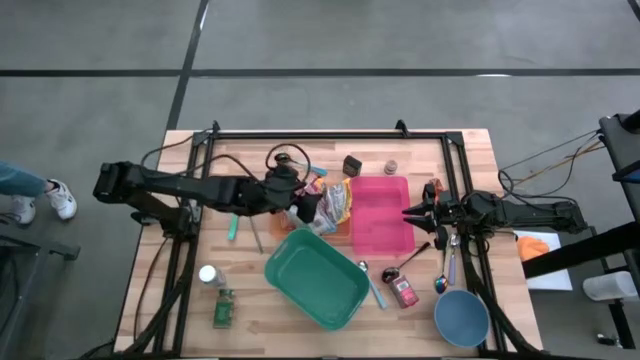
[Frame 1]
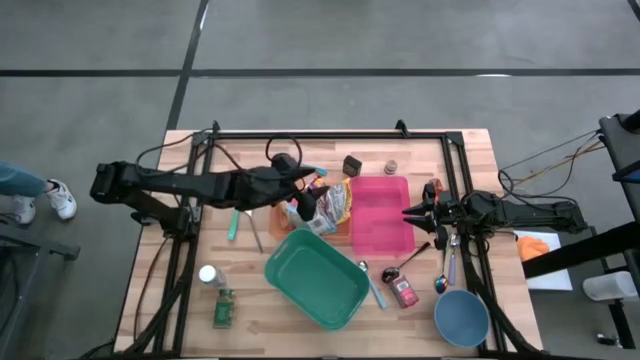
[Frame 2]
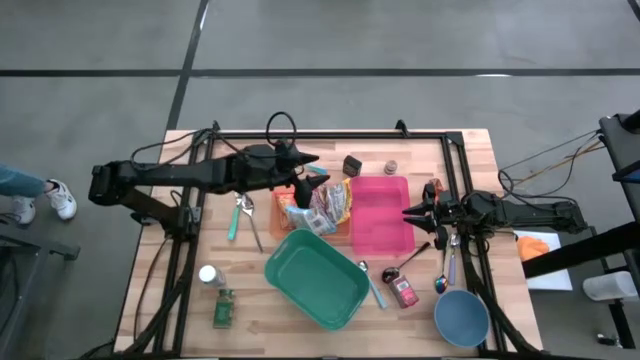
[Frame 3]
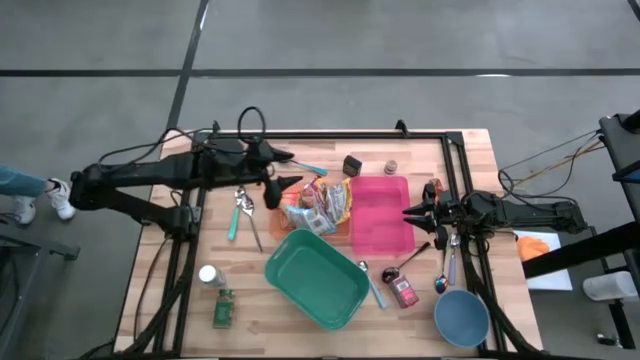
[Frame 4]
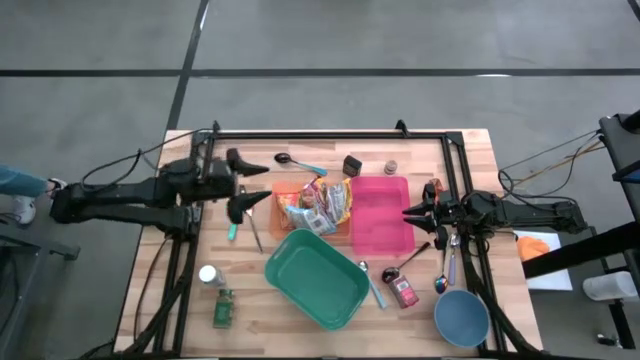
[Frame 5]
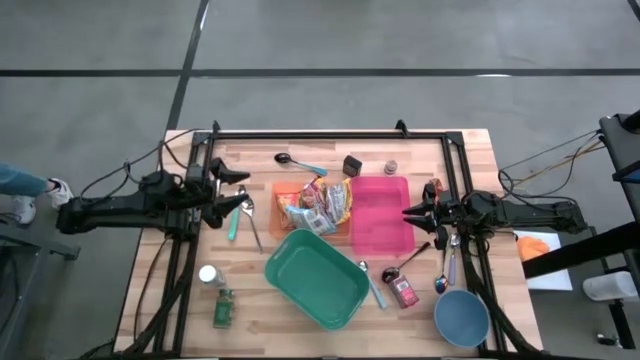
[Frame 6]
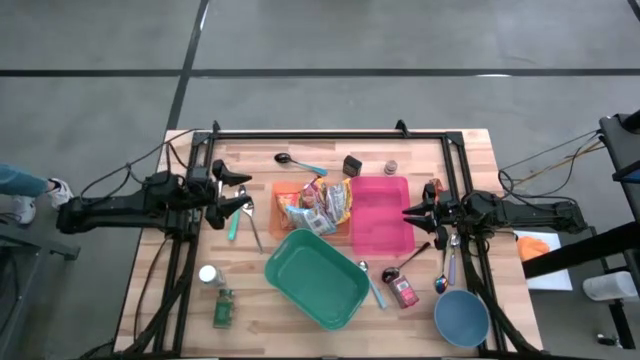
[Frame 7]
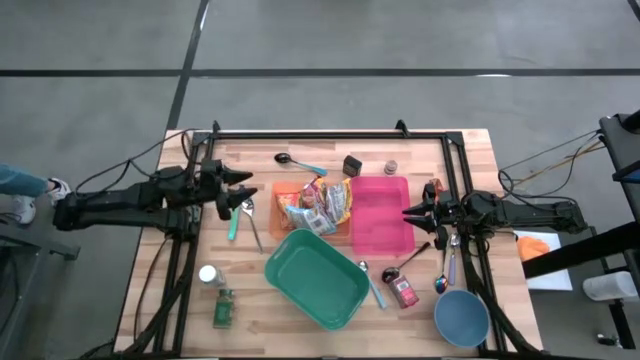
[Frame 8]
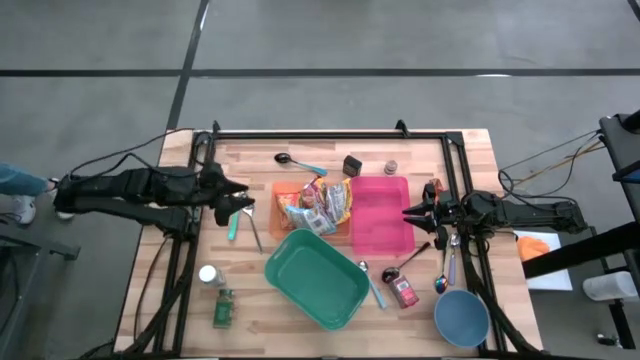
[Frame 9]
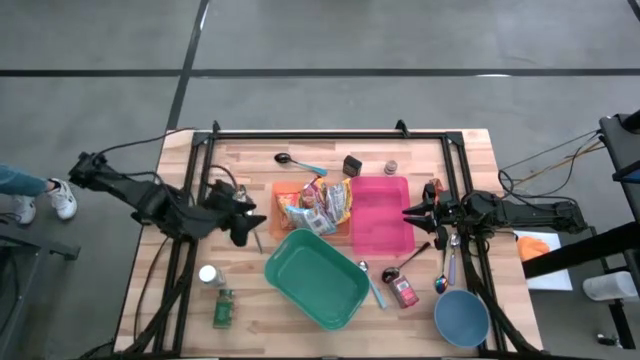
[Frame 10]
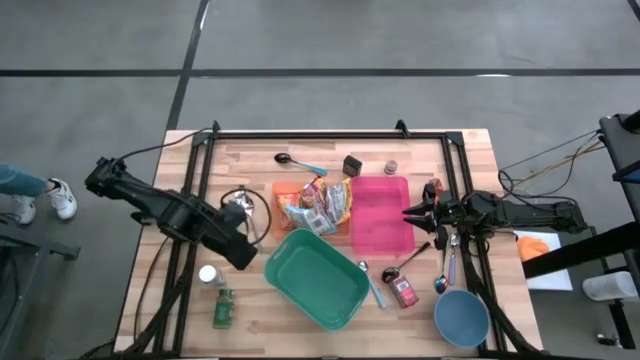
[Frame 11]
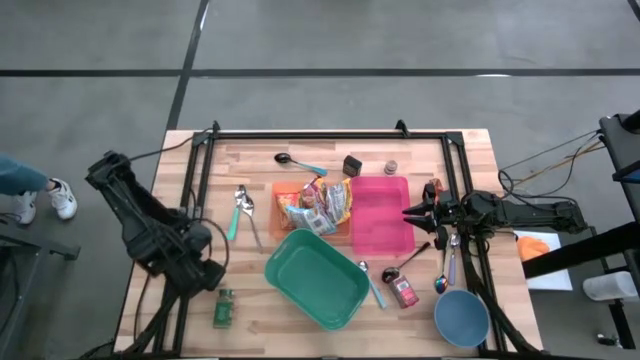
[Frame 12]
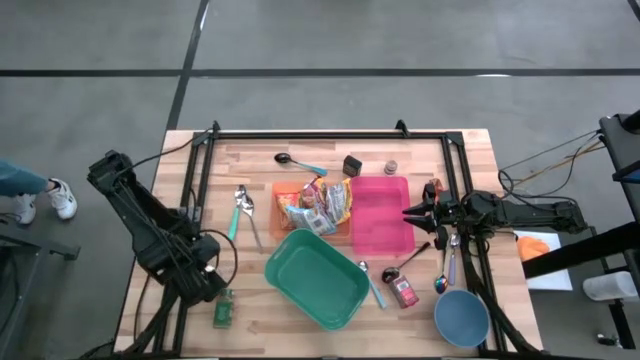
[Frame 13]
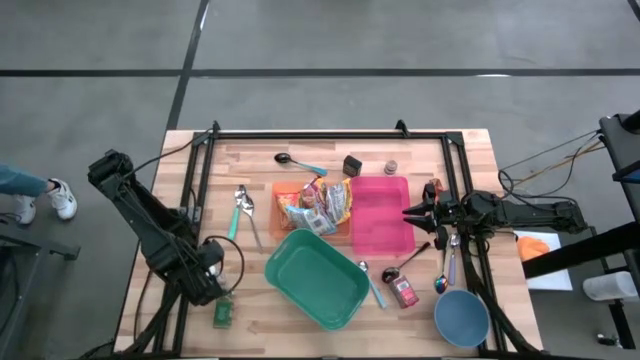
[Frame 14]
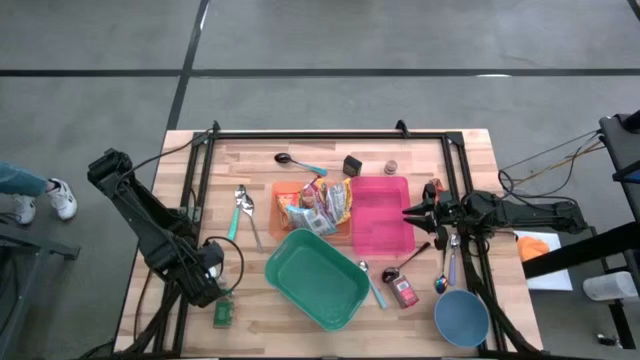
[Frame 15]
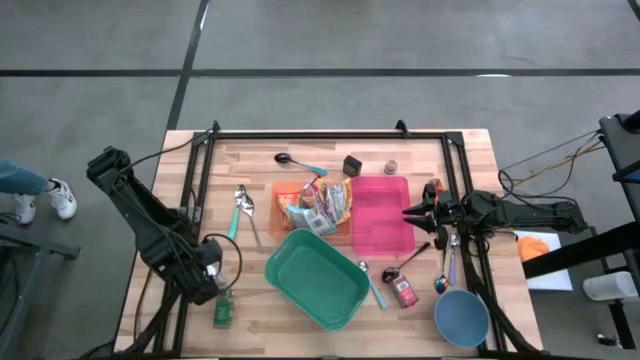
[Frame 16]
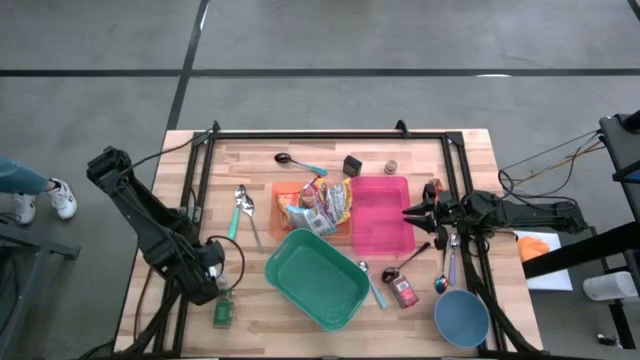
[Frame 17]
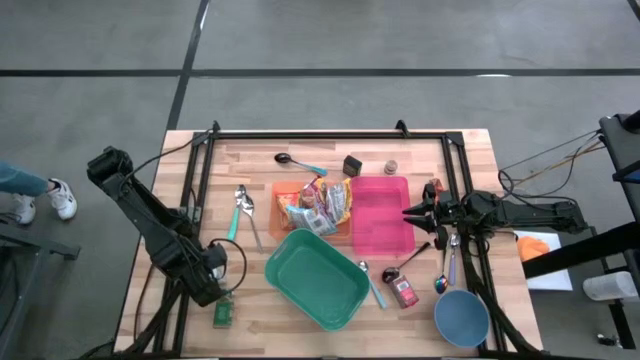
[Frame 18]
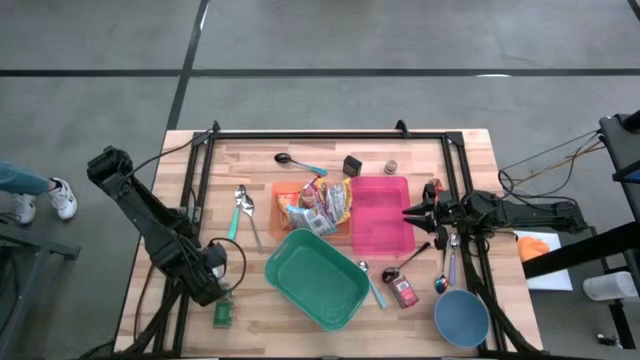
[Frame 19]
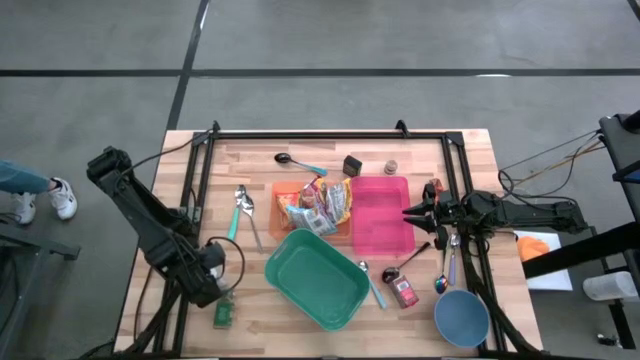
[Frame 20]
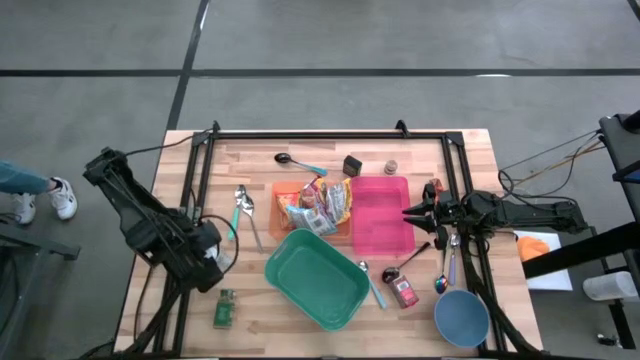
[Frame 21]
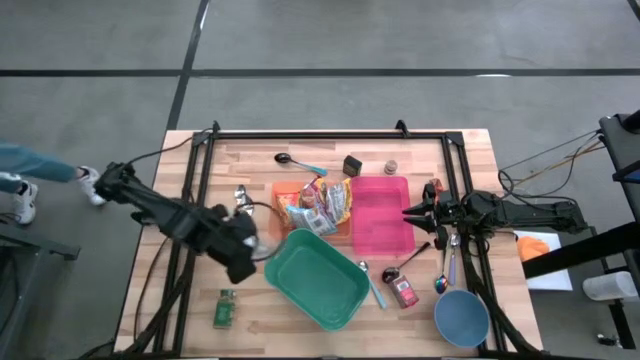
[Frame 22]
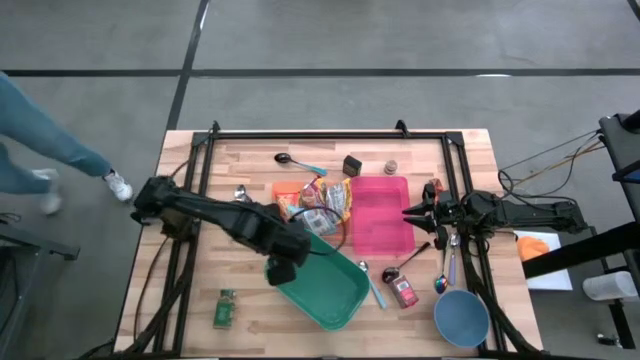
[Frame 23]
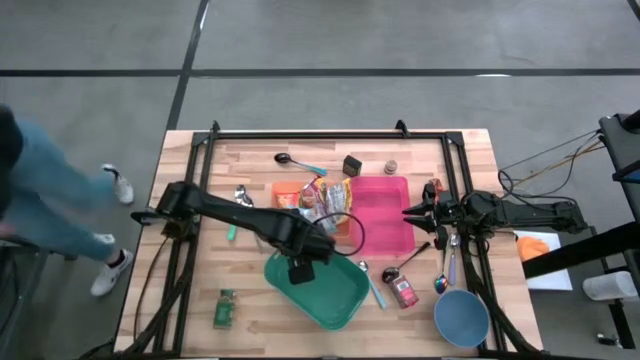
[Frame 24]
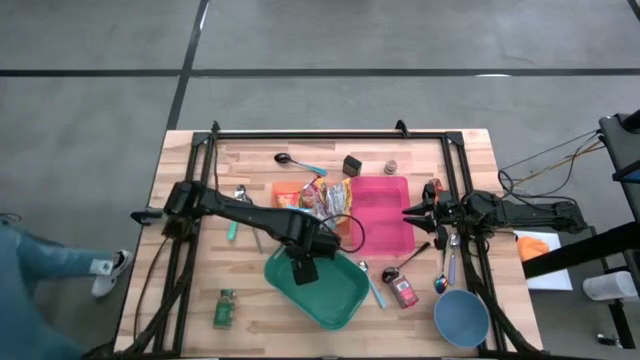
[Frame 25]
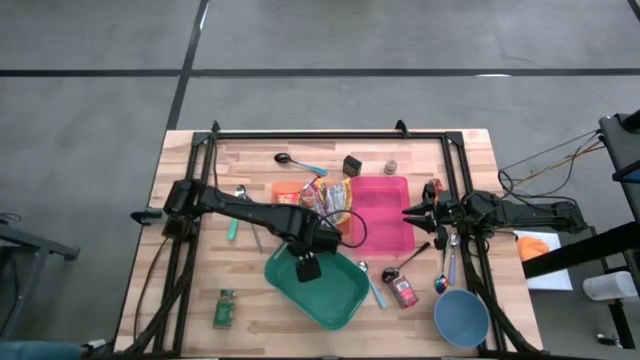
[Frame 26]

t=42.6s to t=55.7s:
Put the white seasoning bottle into the green bin

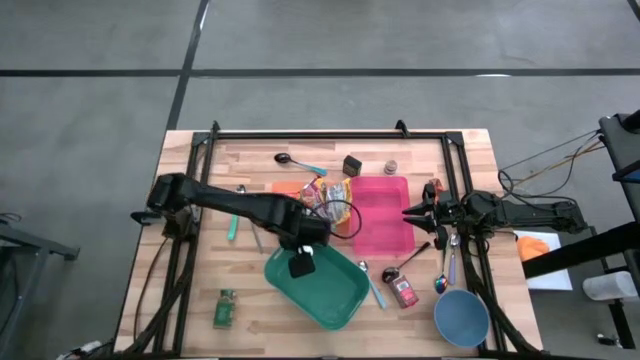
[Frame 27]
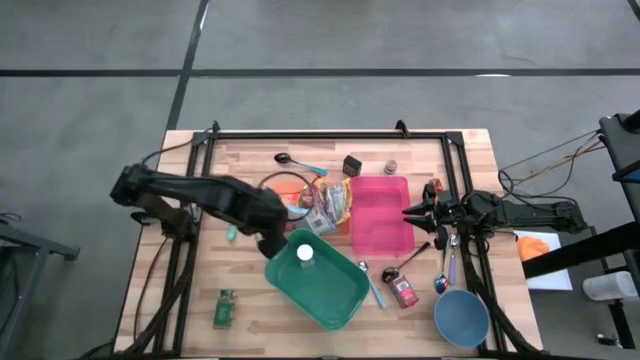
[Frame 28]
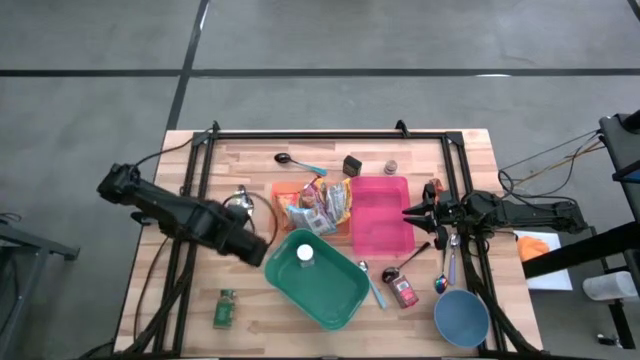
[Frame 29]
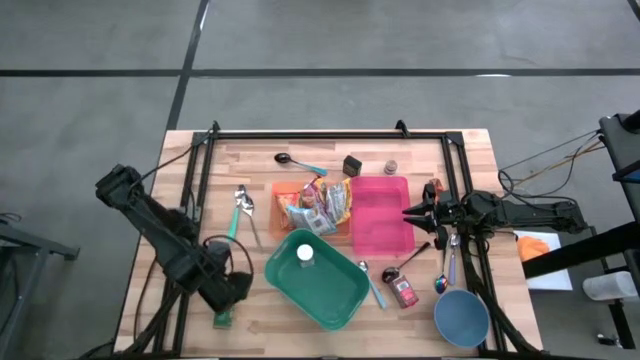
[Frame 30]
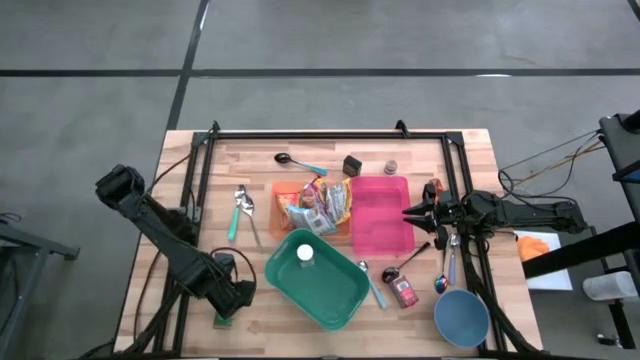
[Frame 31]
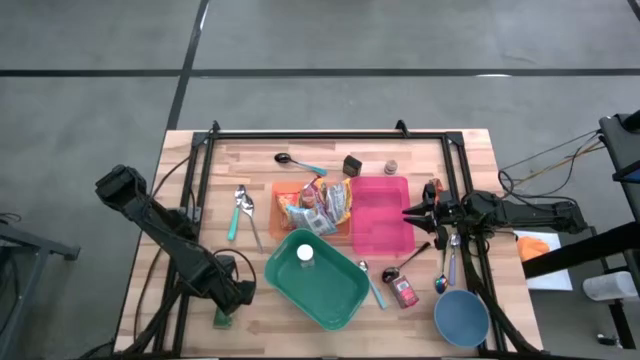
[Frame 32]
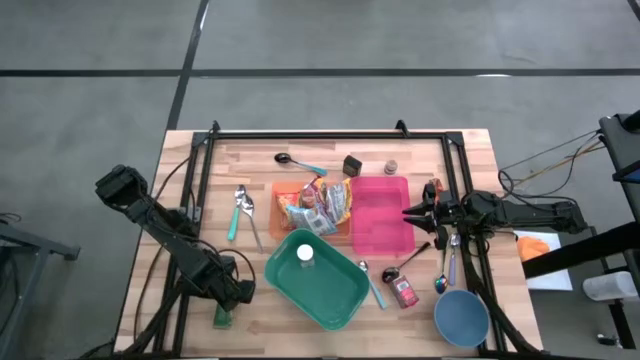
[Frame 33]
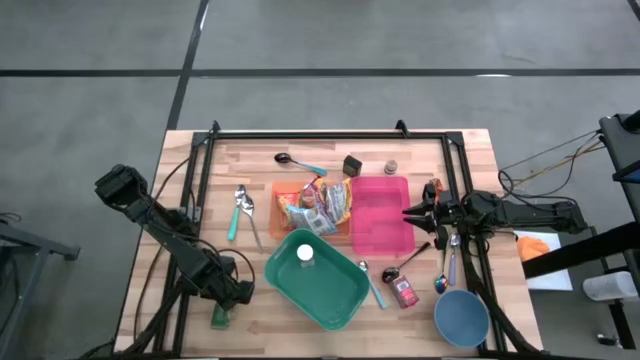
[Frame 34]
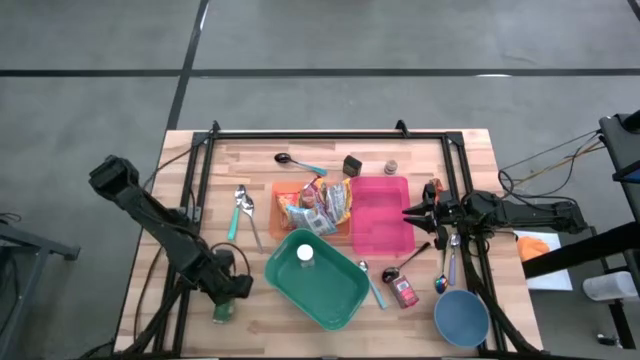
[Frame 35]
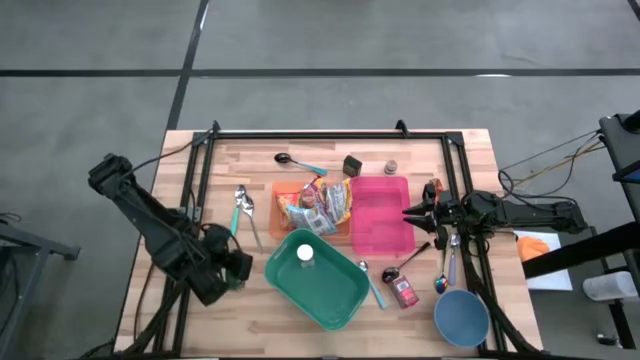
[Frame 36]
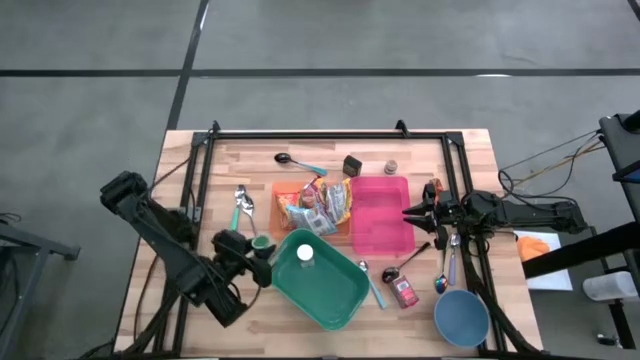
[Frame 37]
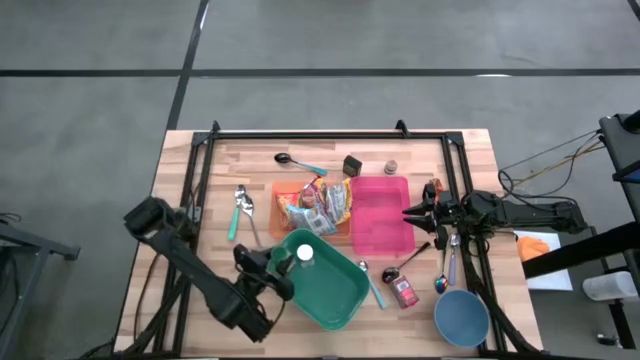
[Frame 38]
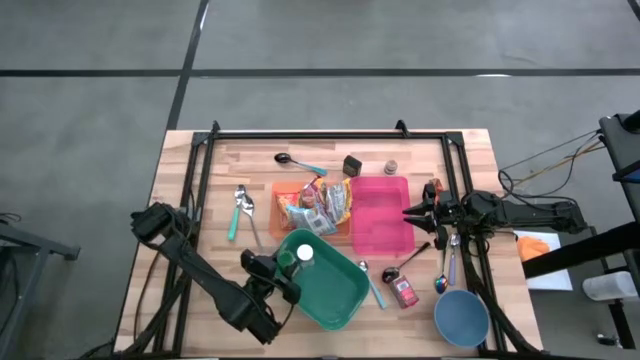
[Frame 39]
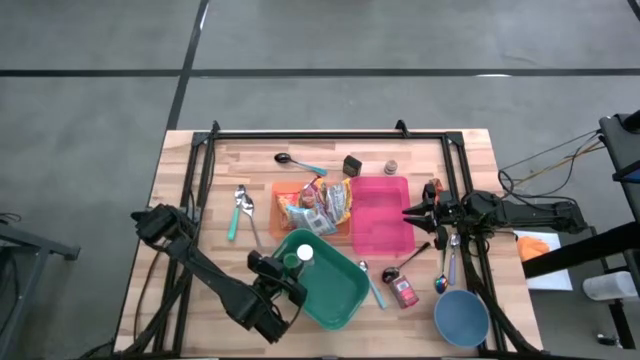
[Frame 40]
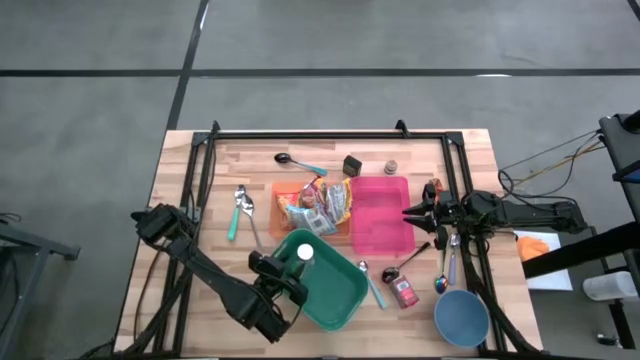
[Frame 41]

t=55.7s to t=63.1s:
Put the green seasoning bottle into the green bin
